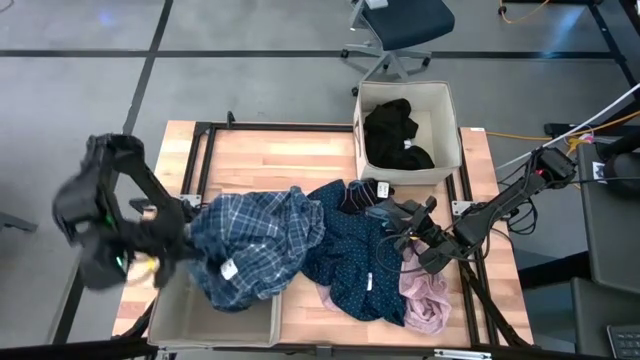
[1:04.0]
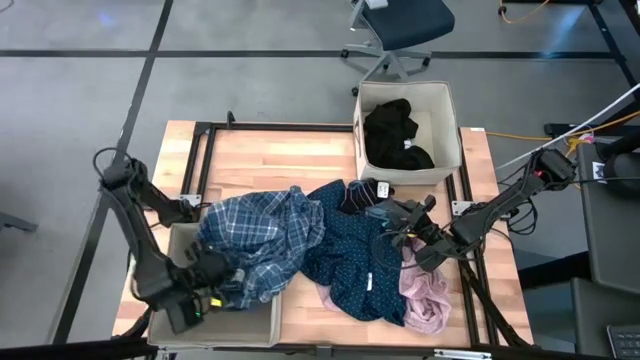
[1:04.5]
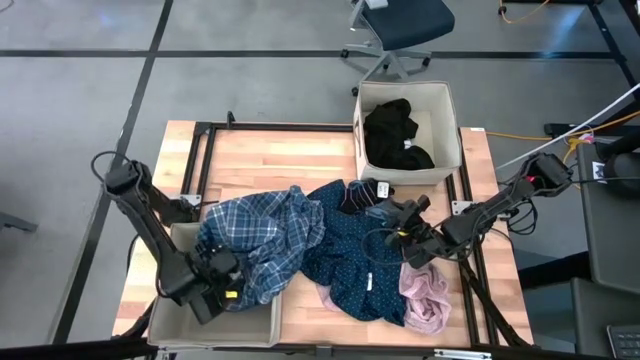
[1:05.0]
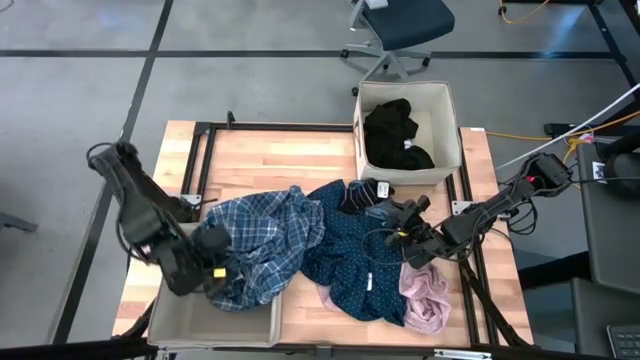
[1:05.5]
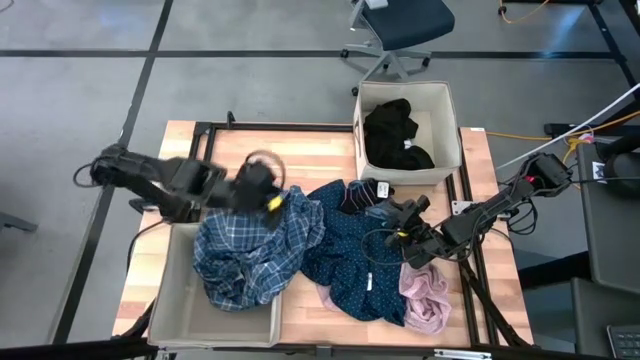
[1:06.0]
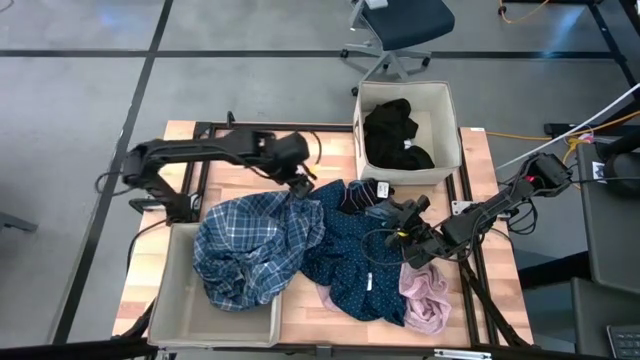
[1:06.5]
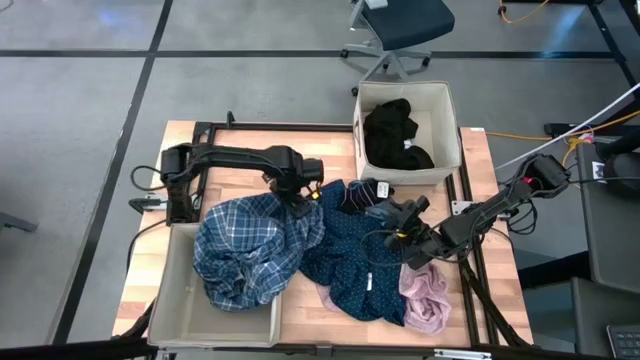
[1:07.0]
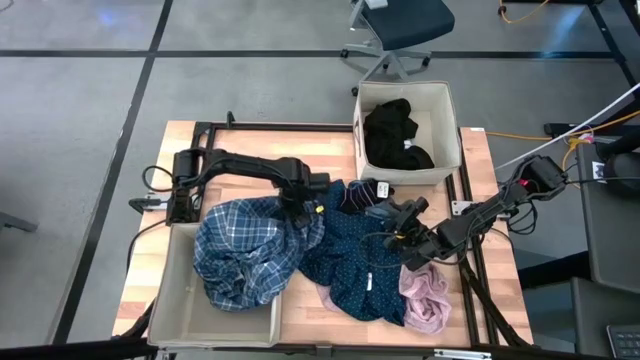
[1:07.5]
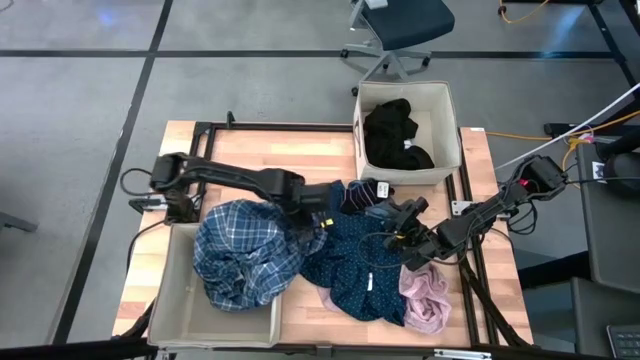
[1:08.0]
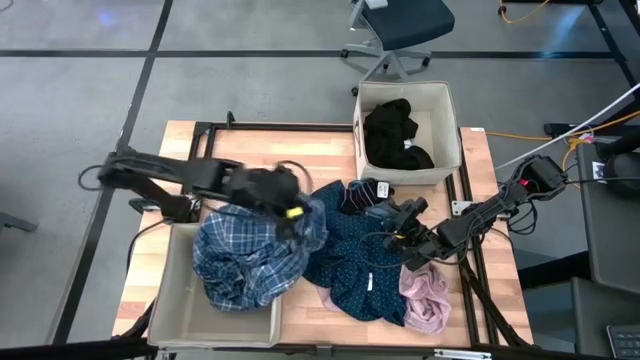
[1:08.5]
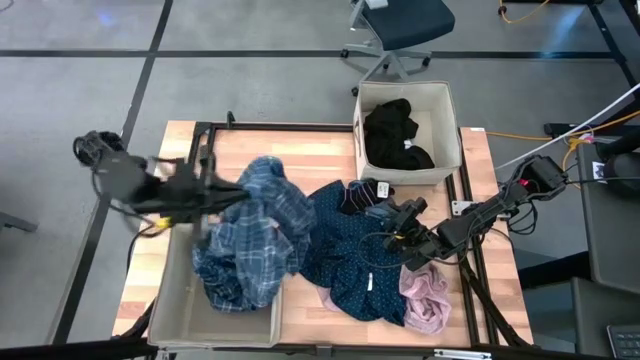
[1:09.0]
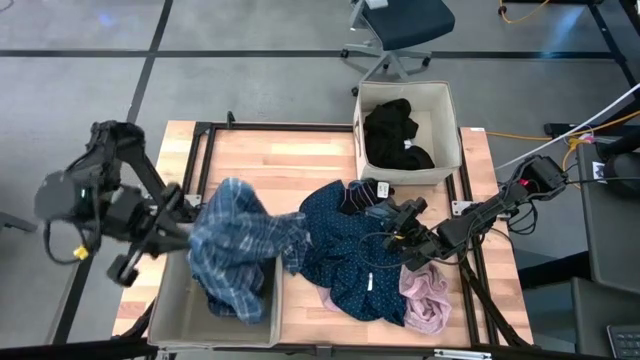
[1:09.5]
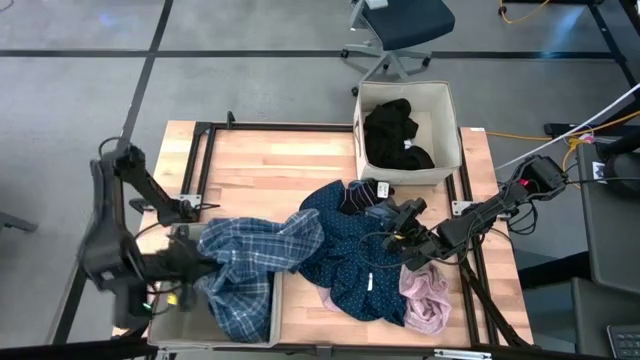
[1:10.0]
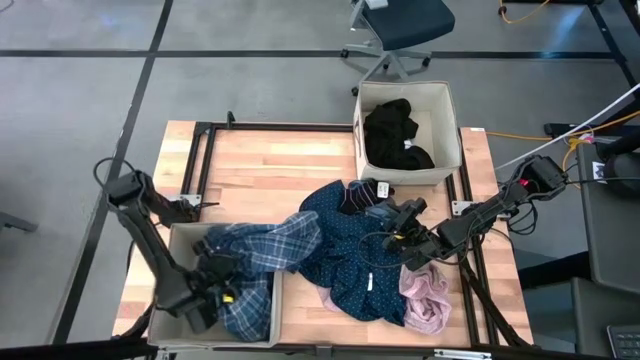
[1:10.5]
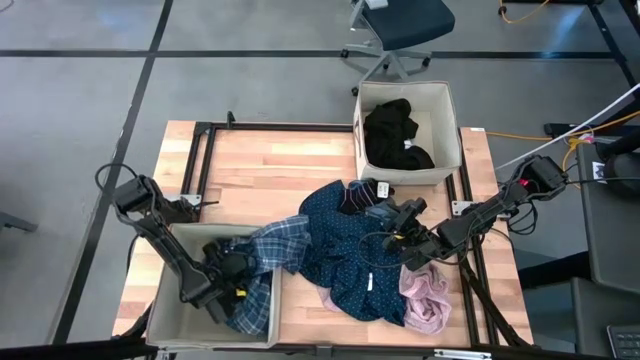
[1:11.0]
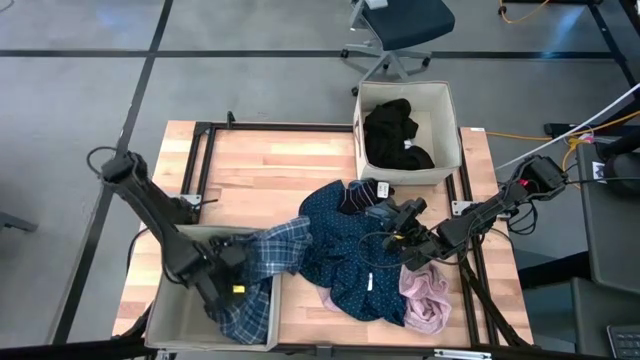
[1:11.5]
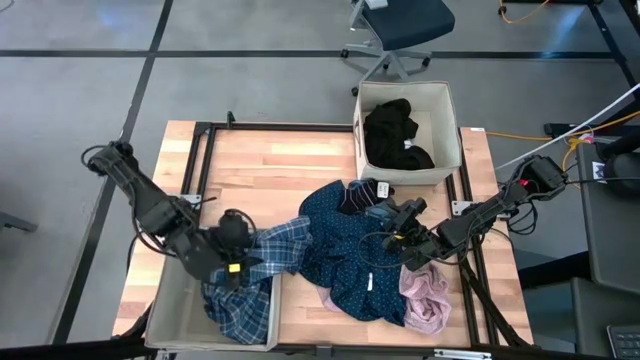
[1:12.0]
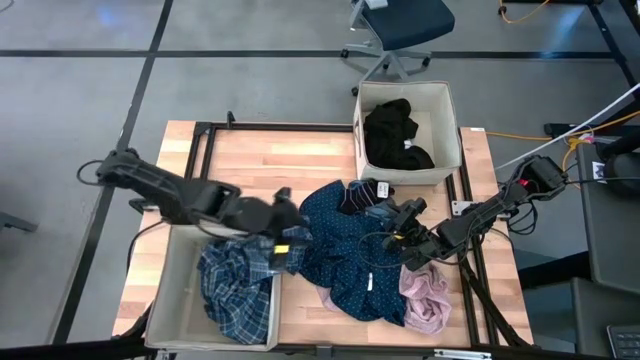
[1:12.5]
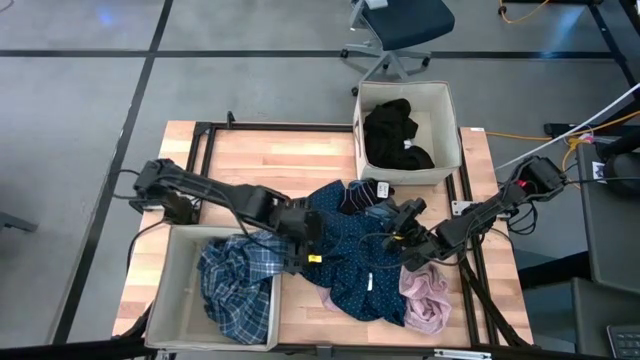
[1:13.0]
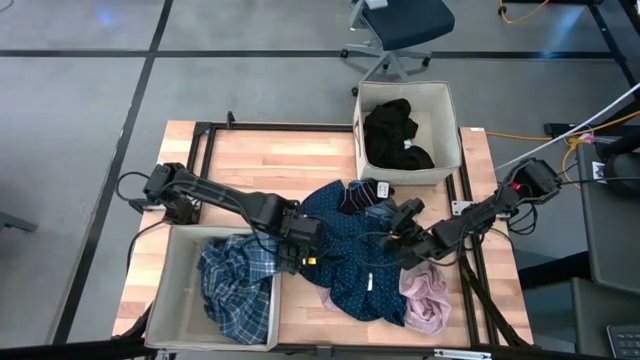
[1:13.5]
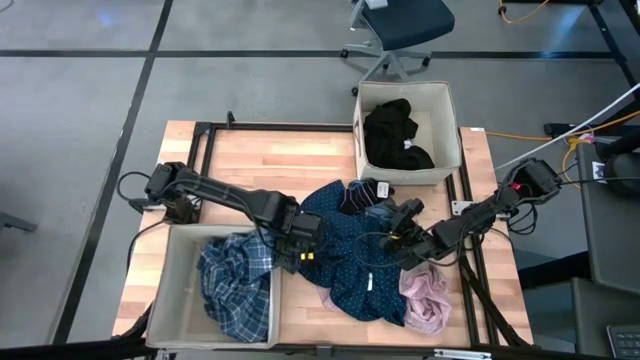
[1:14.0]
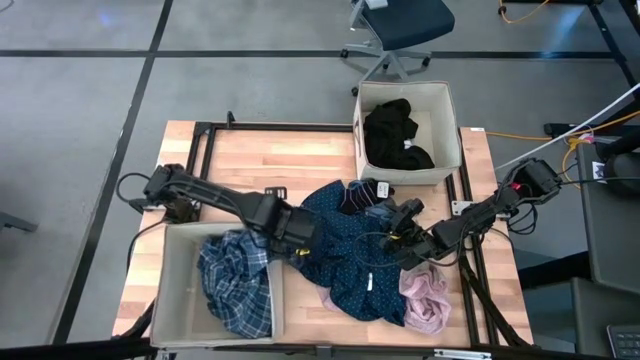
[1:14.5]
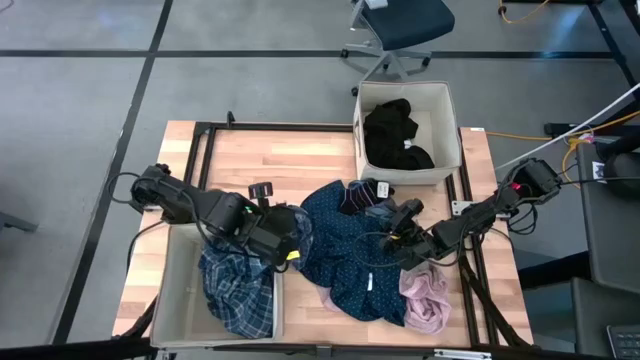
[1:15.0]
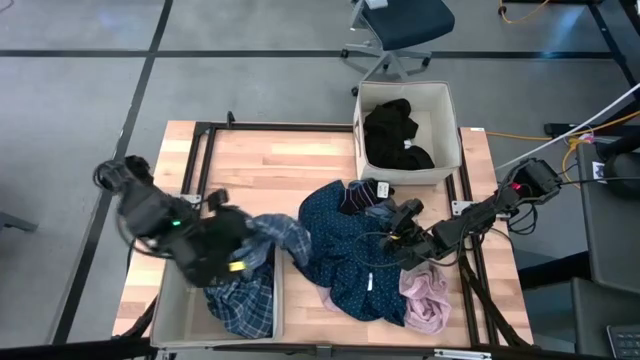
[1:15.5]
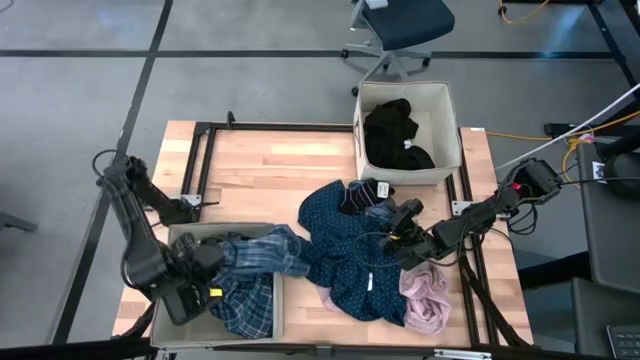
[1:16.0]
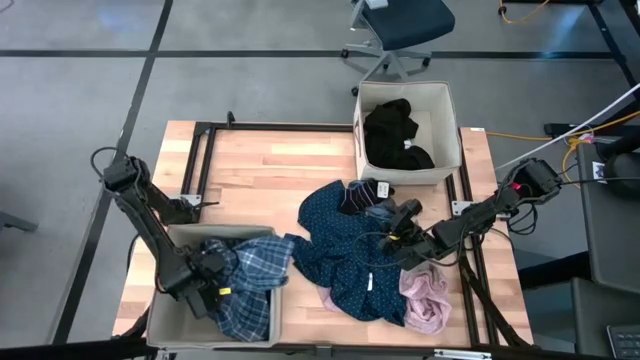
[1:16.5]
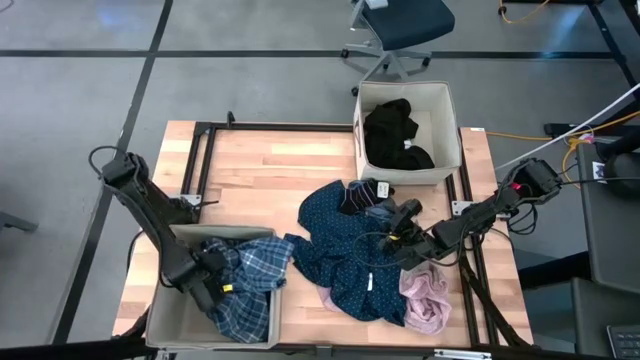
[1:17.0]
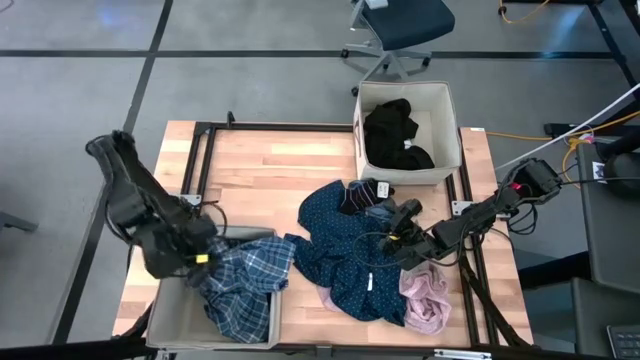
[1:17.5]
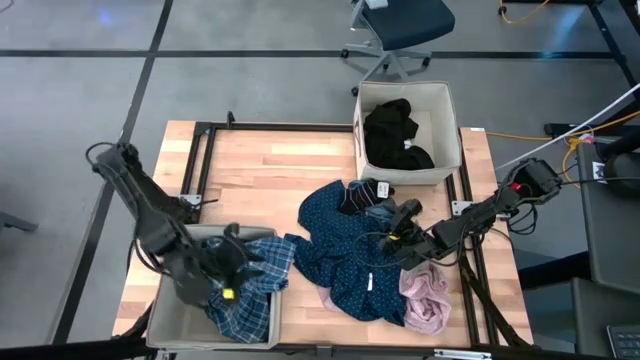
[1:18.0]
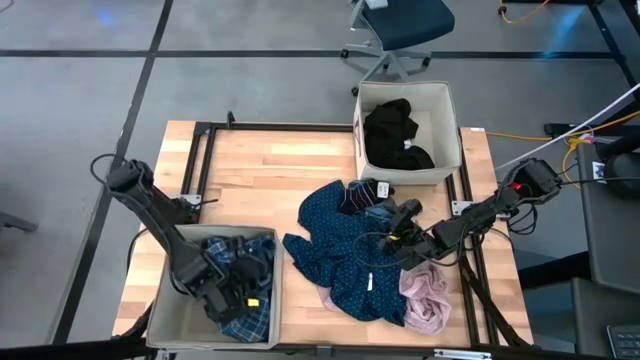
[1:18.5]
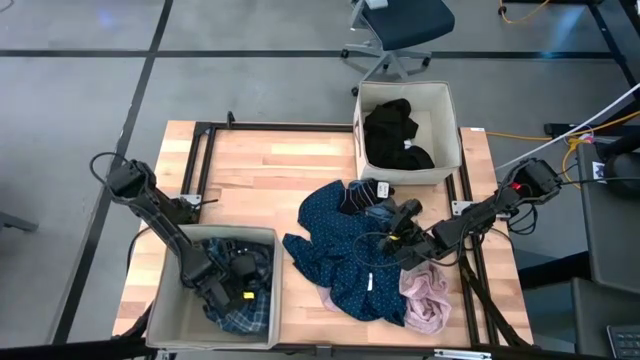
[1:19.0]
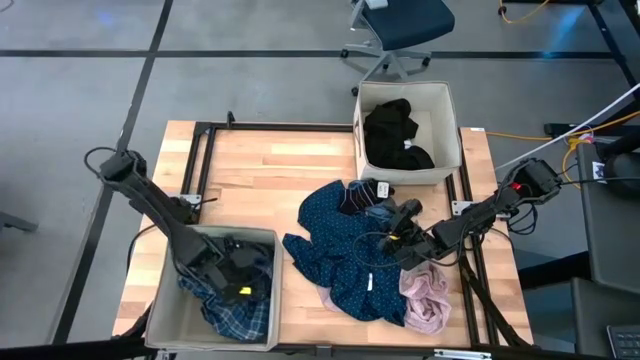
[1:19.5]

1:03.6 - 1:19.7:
Task: Sort clothes
Put the blue pants into the bottom laundry organizer

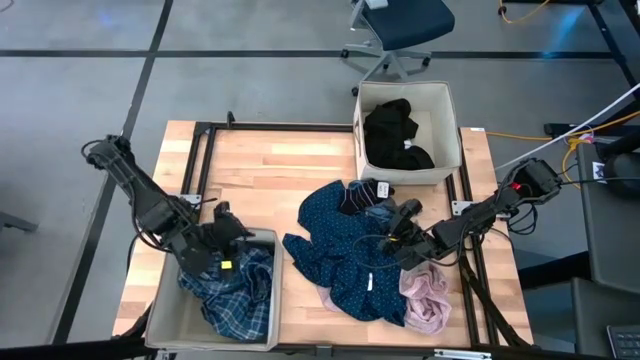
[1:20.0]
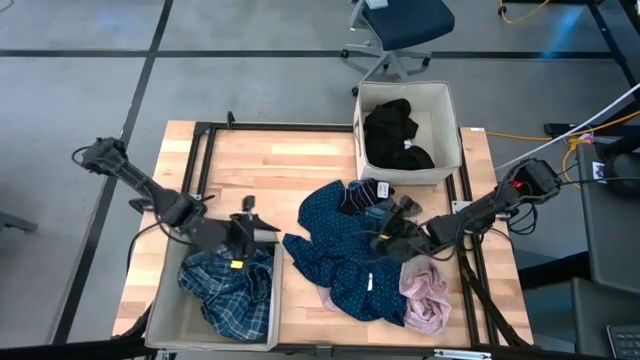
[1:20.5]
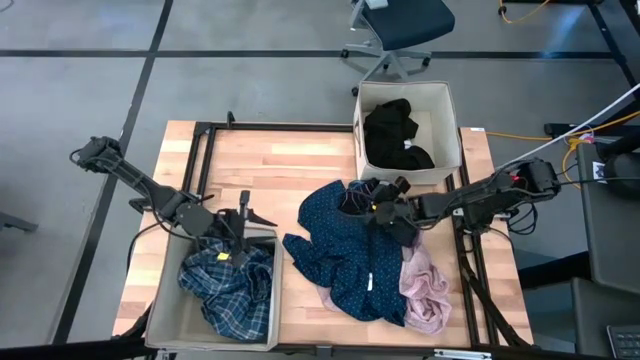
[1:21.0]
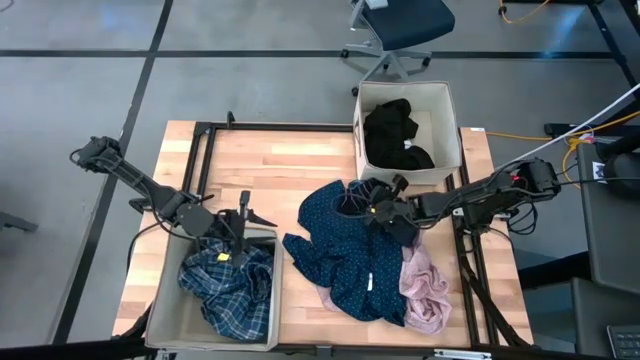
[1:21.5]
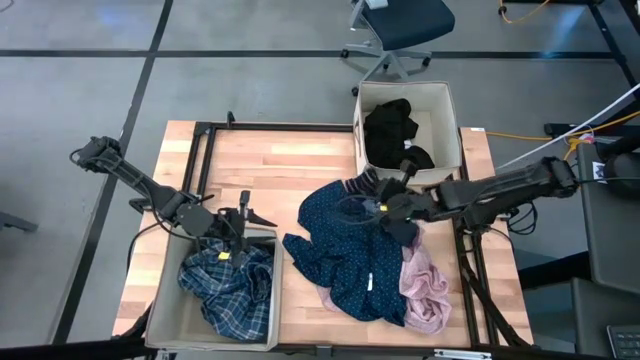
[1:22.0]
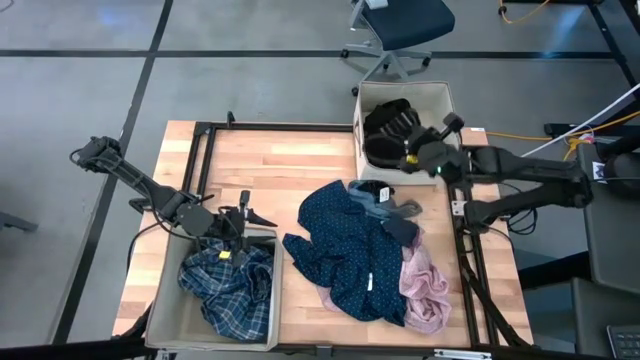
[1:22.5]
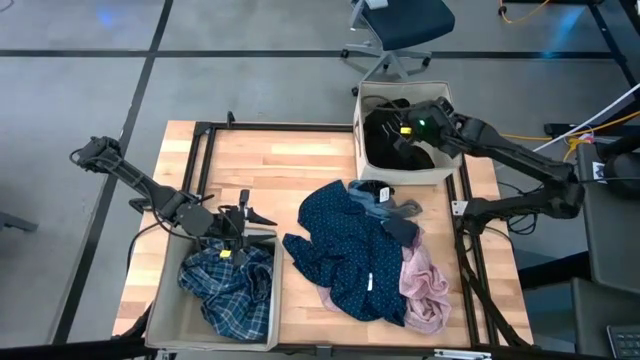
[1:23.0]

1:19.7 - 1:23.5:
Put the black sock into the top laundry organizer

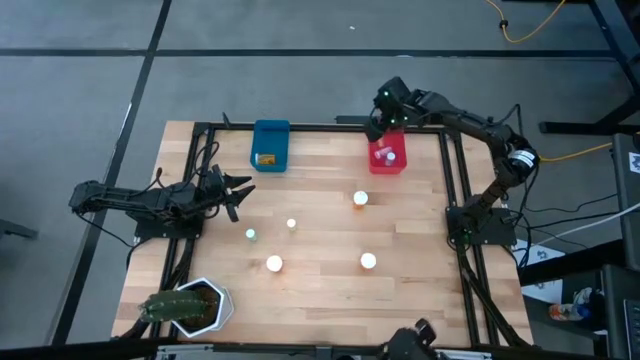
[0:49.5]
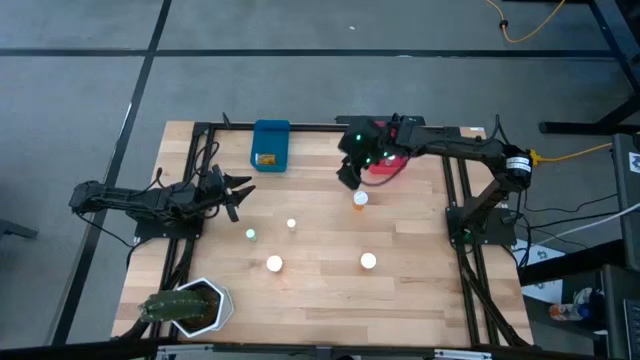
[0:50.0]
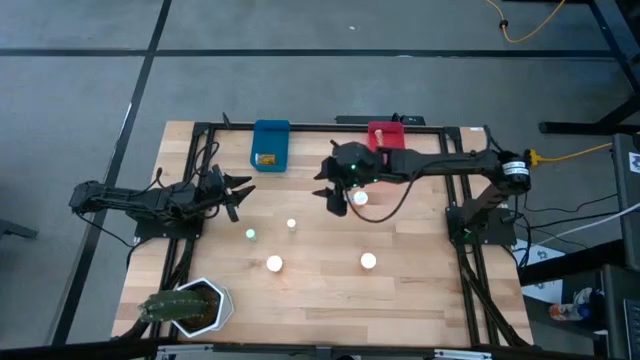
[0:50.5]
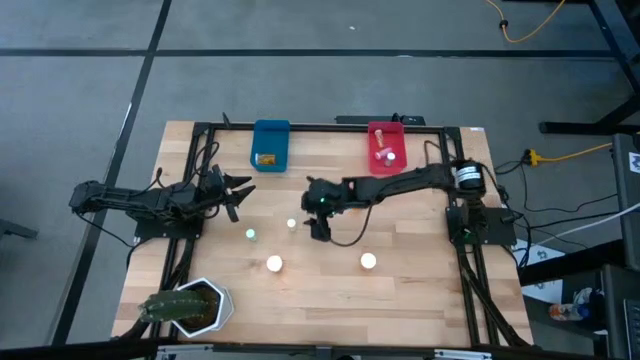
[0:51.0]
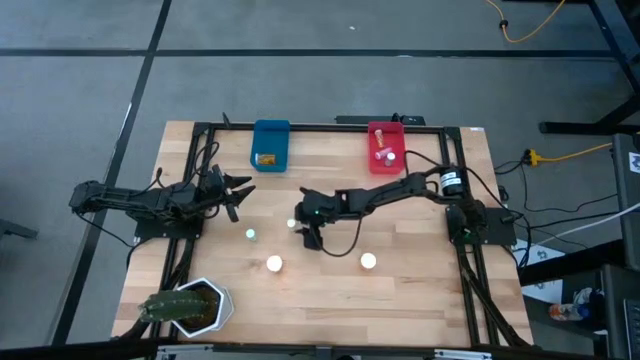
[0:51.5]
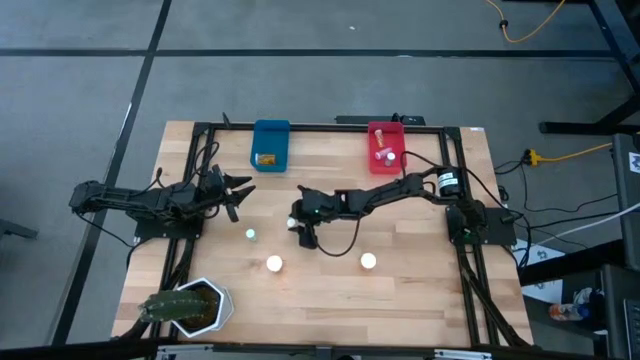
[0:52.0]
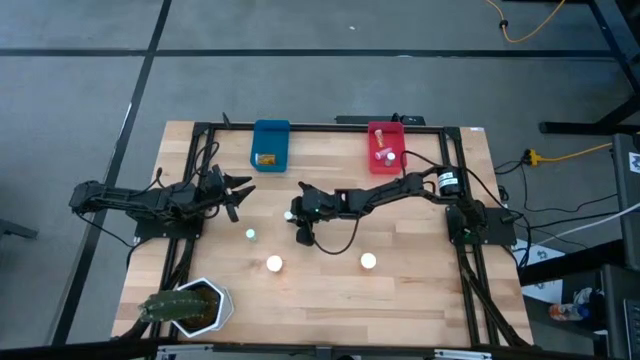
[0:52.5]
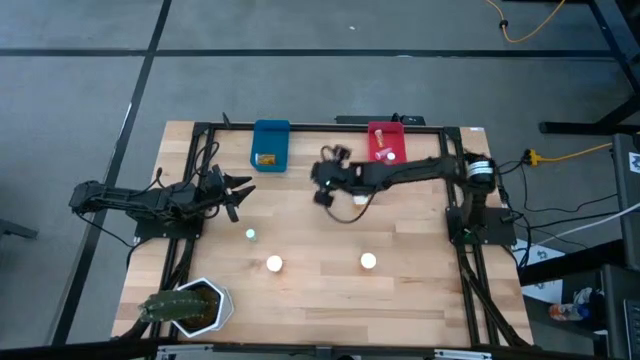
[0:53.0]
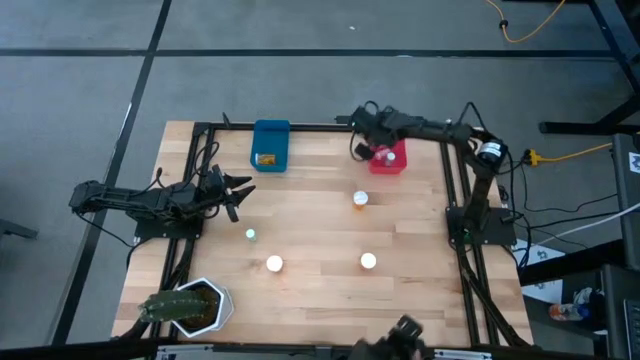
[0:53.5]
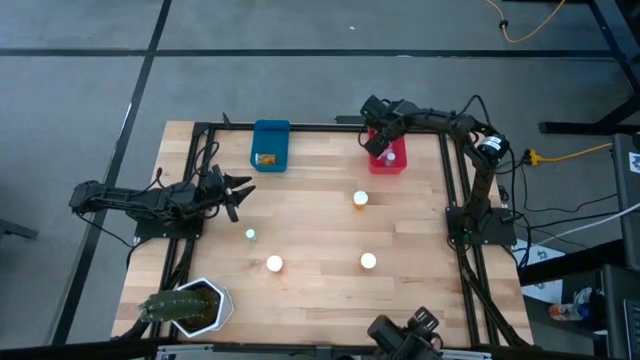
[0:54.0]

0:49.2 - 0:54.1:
Task: Pick and place medicine bottles into bin by pill shape (circle, oval)
Put the small yellow pill bottle into the red bin
